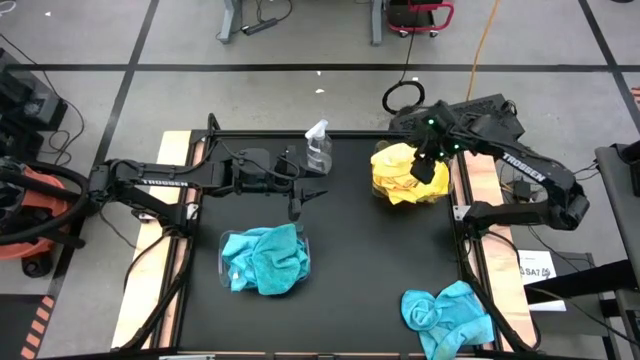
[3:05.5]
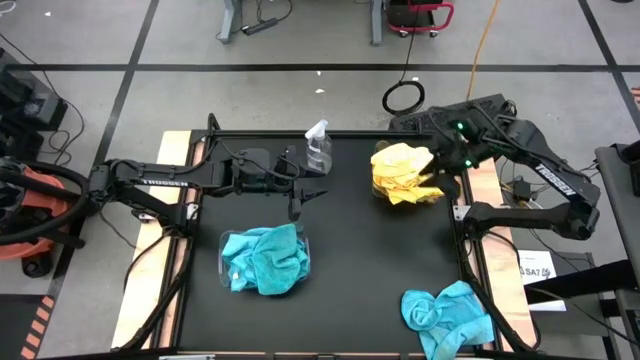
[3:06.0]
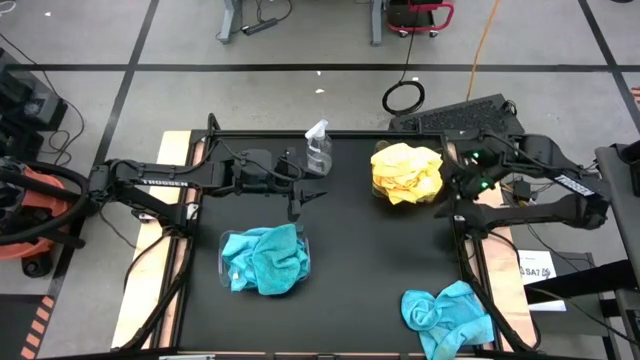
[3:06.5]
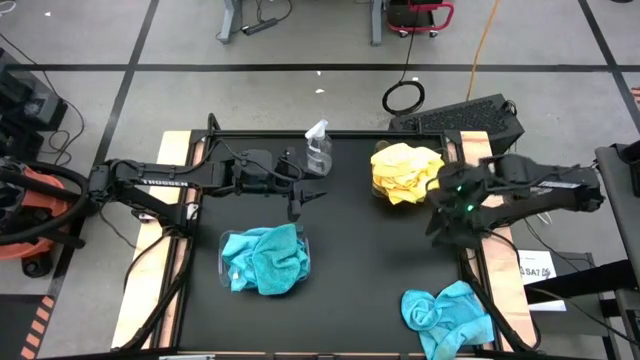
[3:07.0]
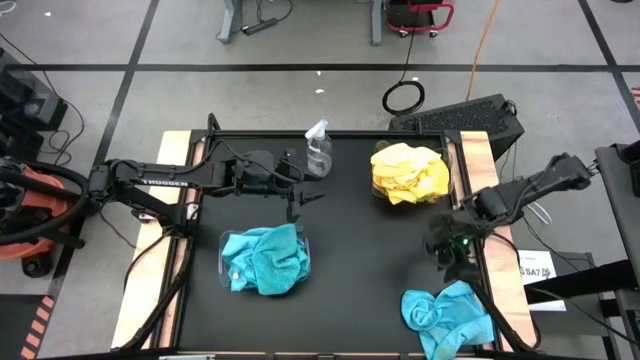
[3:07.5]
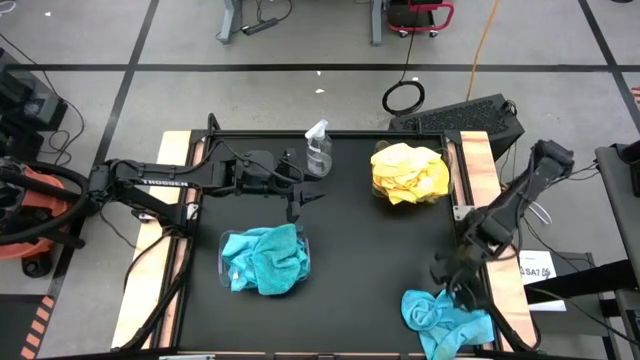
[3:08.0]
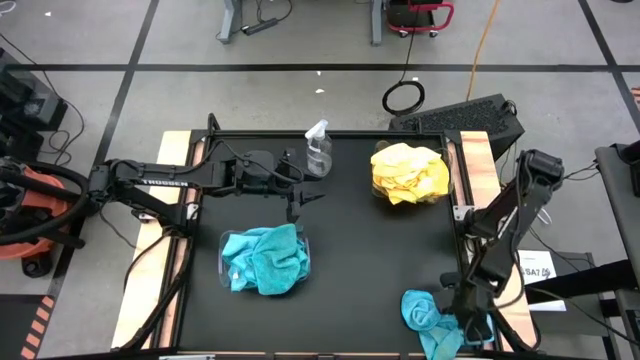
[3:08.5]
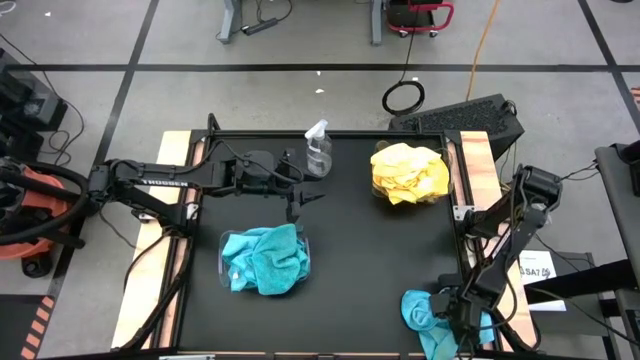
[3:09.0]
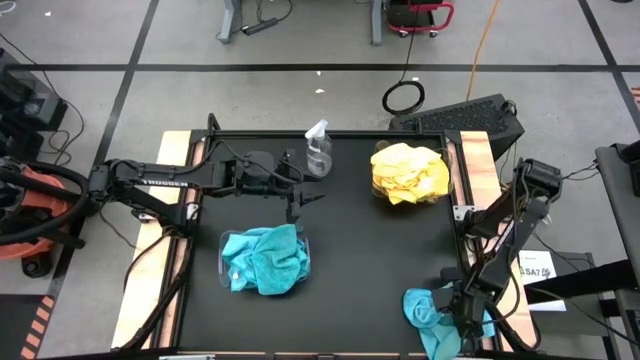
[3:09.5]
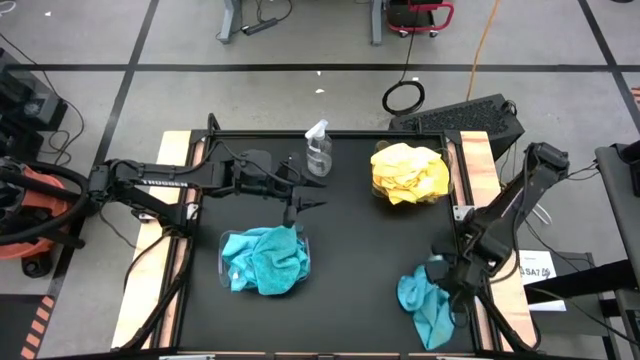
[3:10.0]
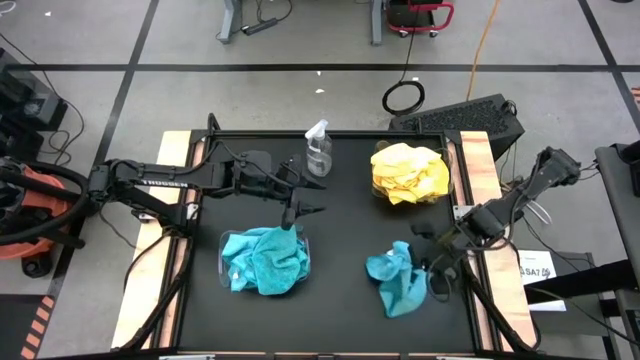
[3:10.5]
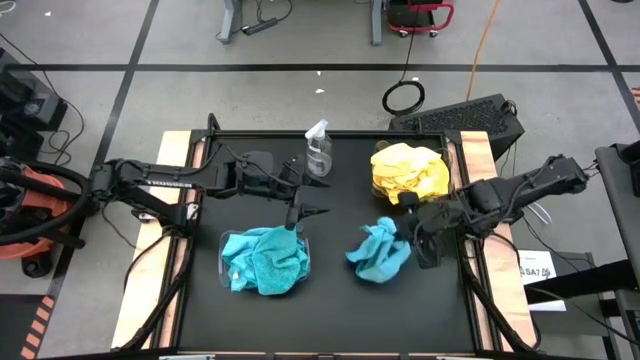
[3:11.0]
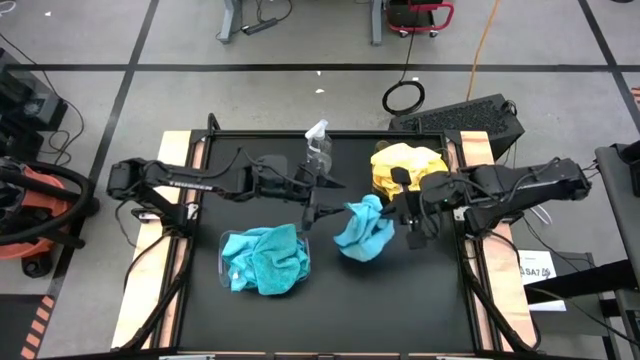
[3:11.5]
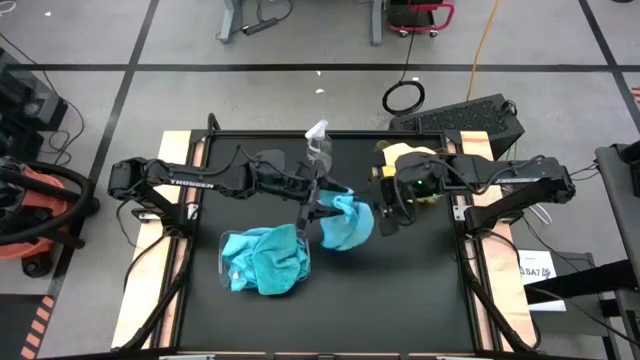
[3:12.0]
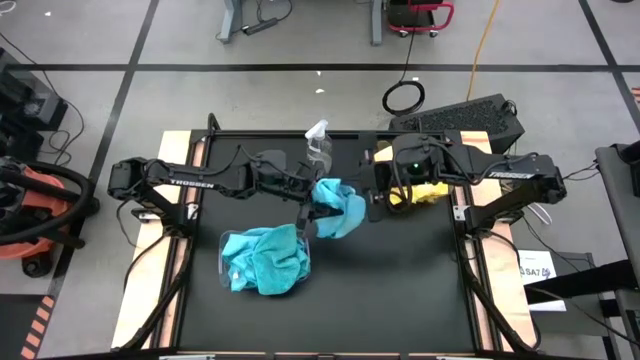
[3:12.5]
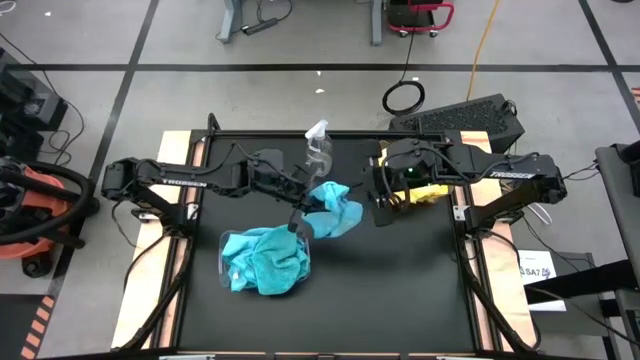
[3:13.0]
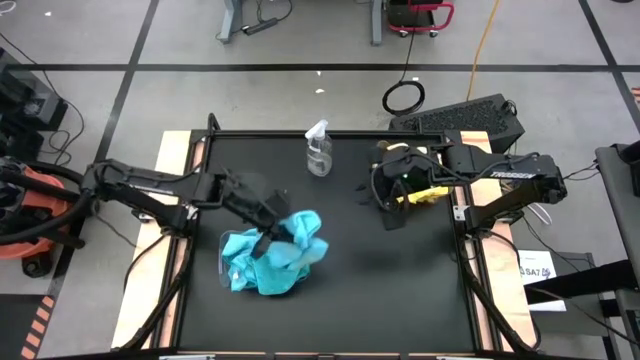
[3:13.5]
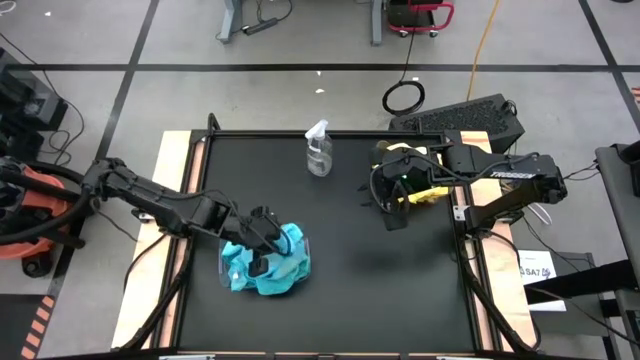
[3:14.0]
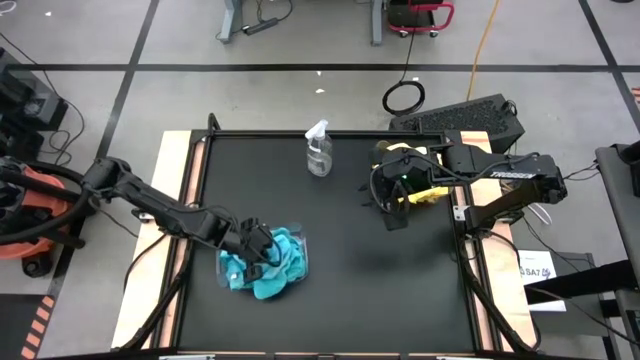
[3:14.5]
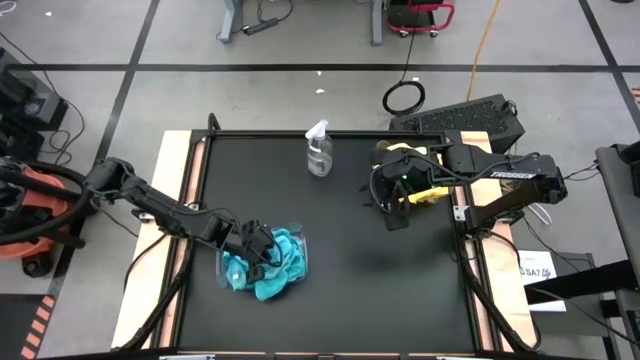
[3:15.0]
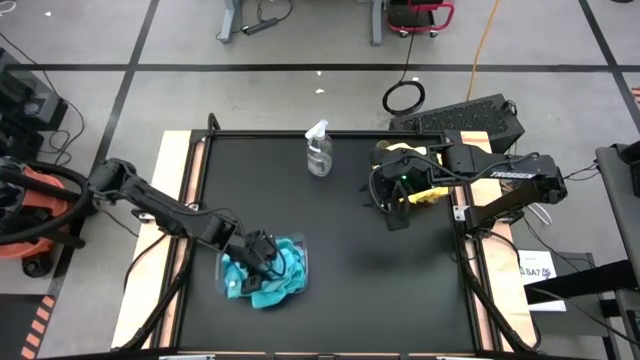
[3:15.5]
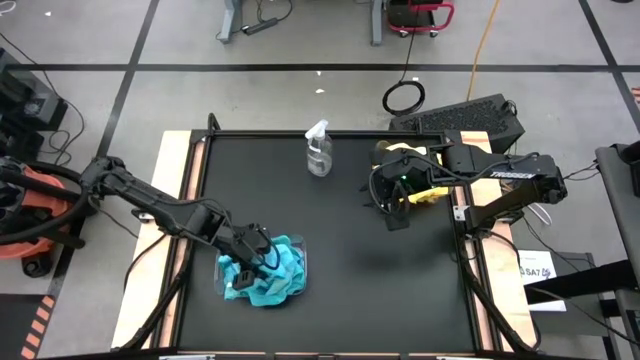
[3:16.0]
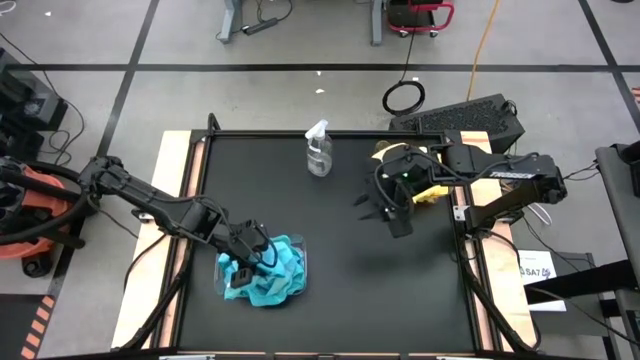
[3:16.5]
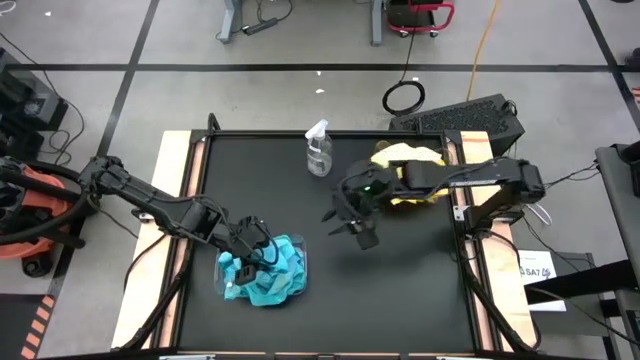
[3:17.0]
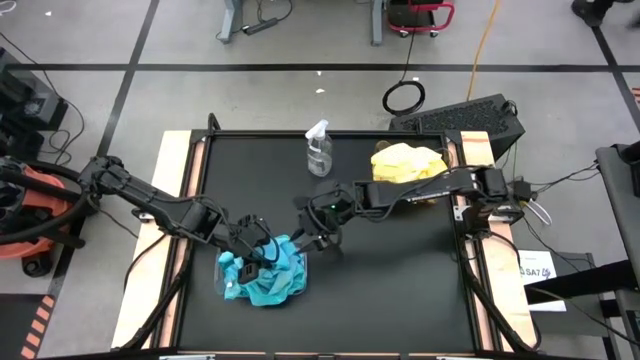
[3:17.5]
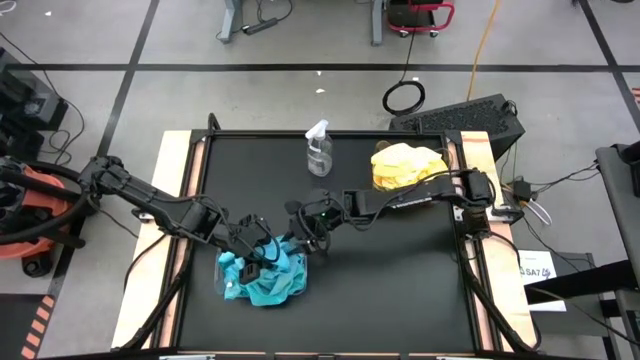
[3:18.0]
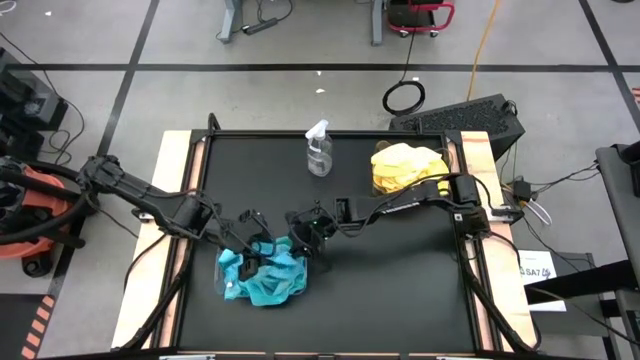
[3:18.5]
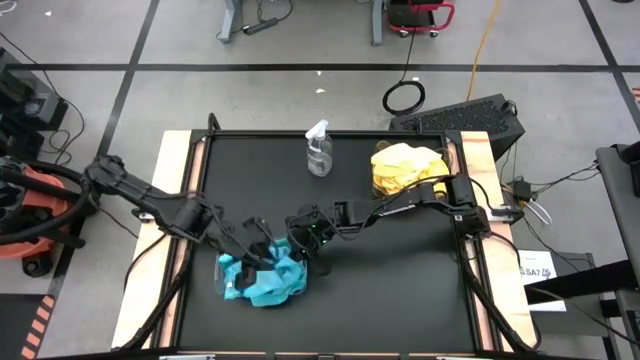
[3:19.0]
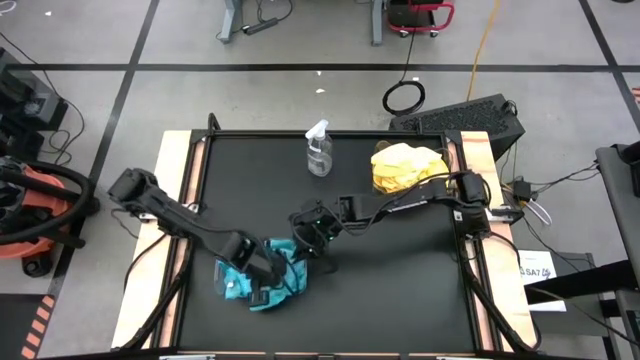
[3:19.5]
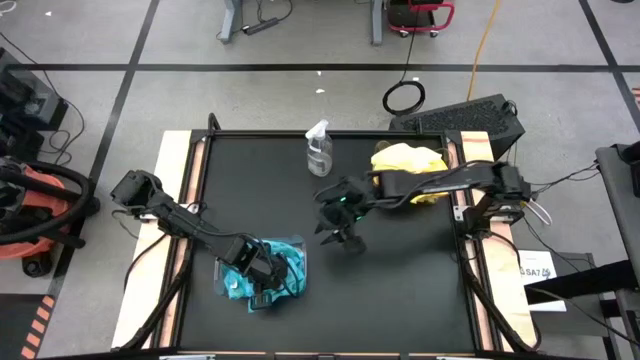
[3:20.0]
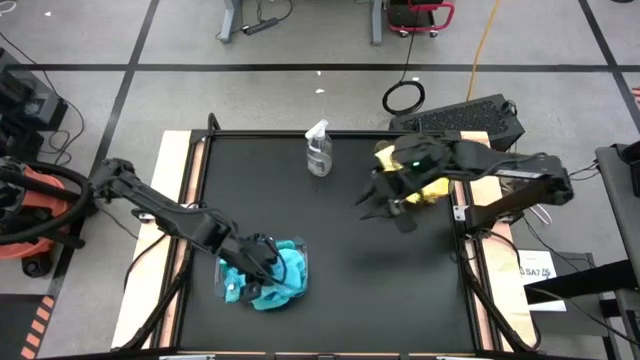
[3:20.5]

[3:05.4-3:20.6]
Task: Sort microfiber towel by color & place in baskets
Put the blue towel into the bottom transparent bin
